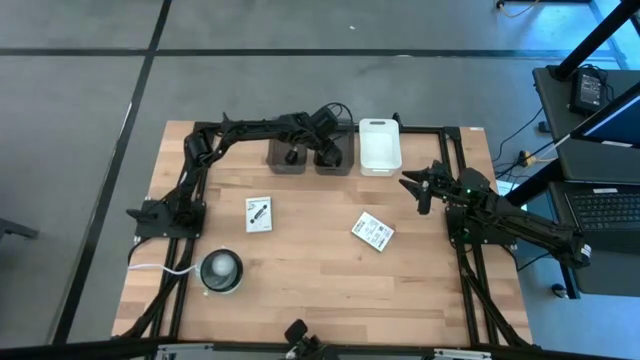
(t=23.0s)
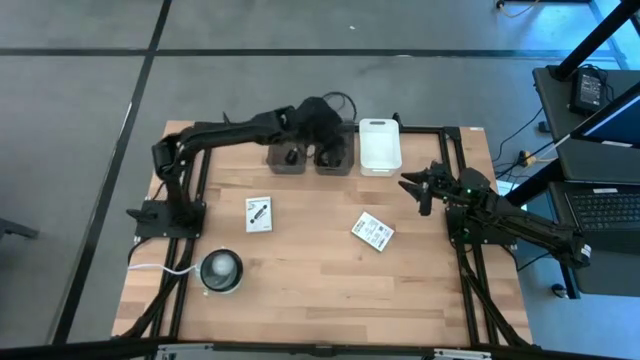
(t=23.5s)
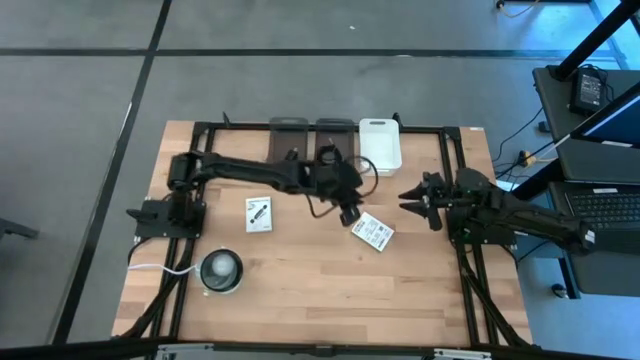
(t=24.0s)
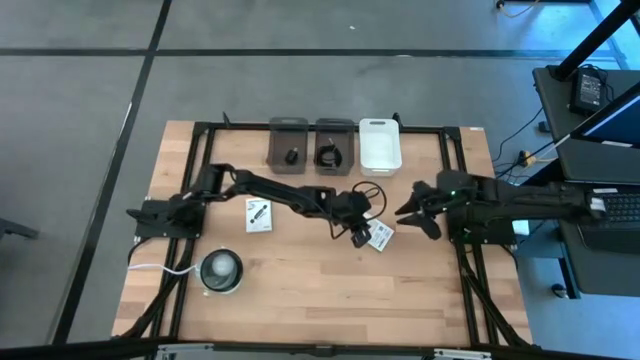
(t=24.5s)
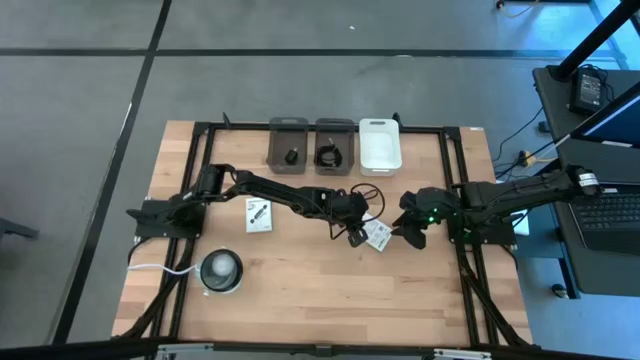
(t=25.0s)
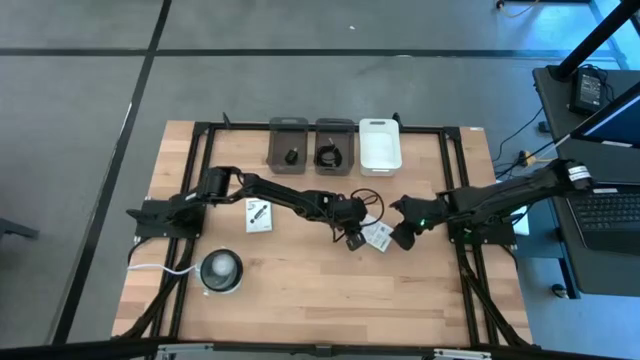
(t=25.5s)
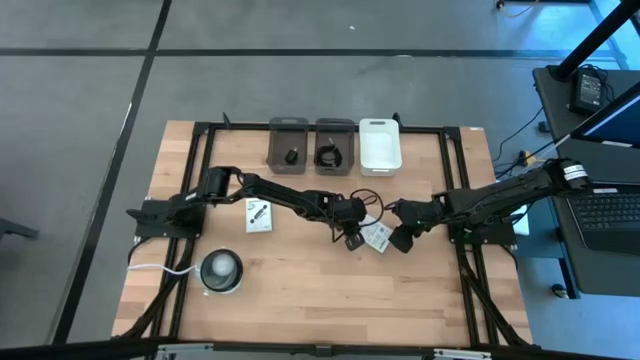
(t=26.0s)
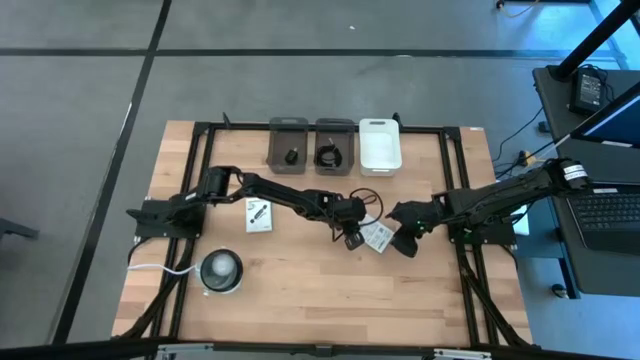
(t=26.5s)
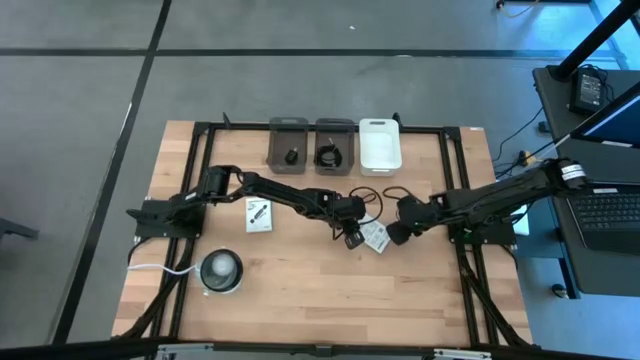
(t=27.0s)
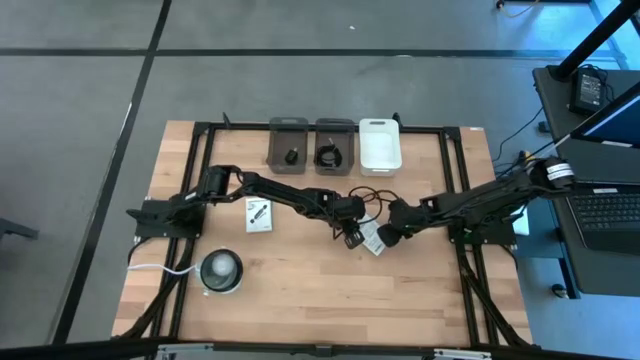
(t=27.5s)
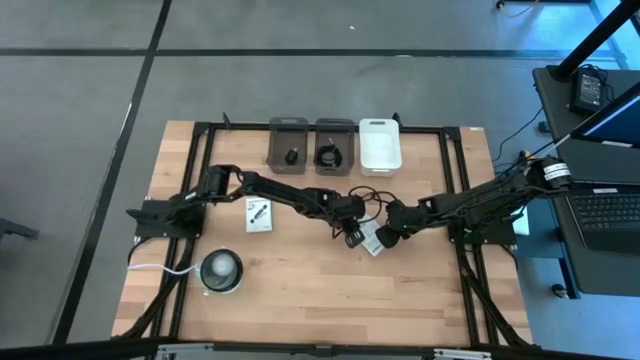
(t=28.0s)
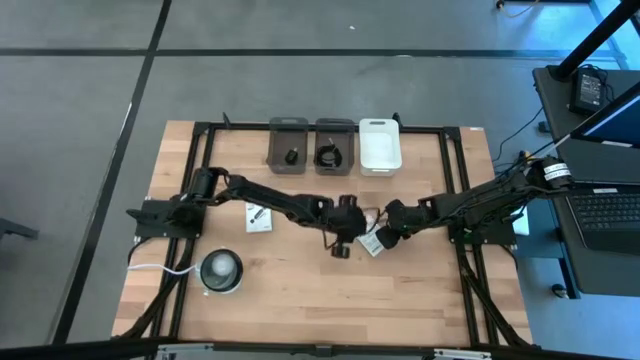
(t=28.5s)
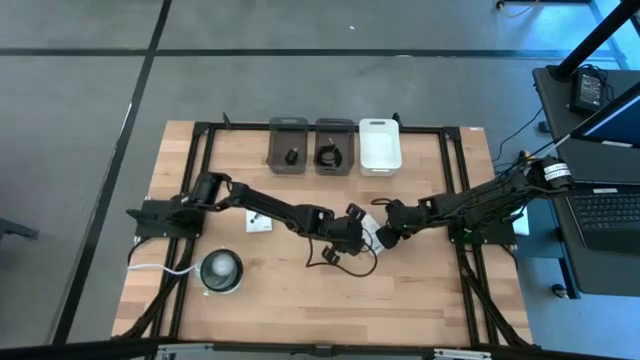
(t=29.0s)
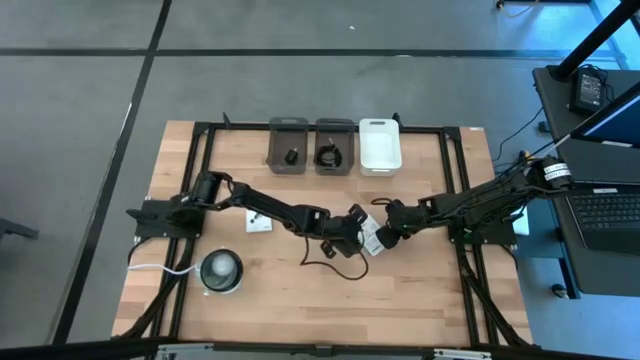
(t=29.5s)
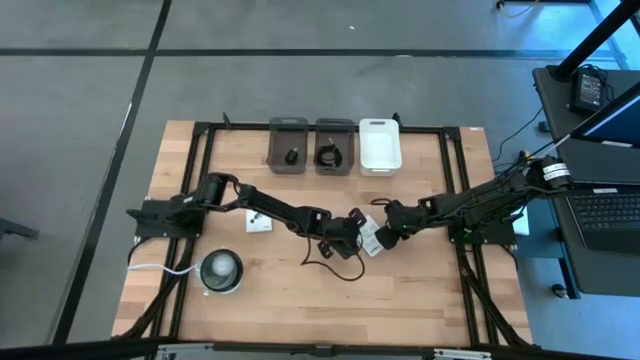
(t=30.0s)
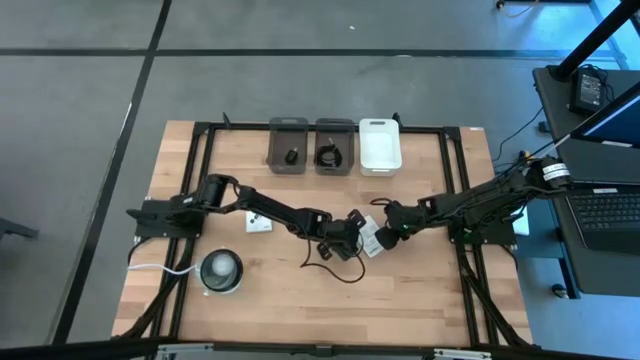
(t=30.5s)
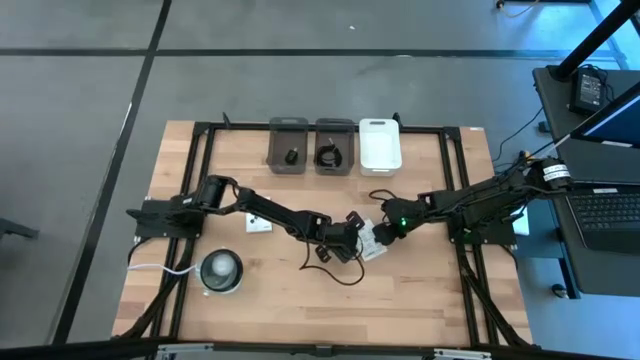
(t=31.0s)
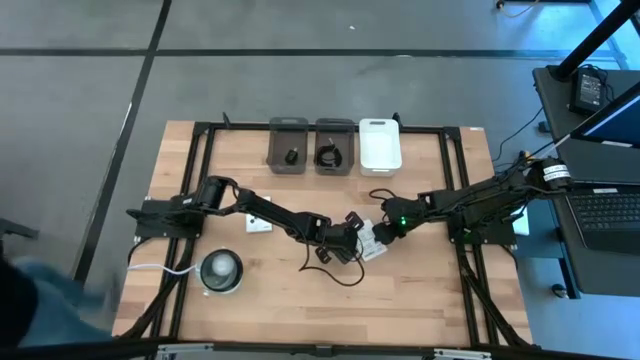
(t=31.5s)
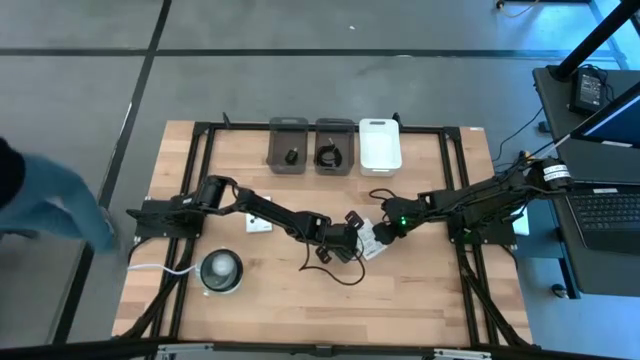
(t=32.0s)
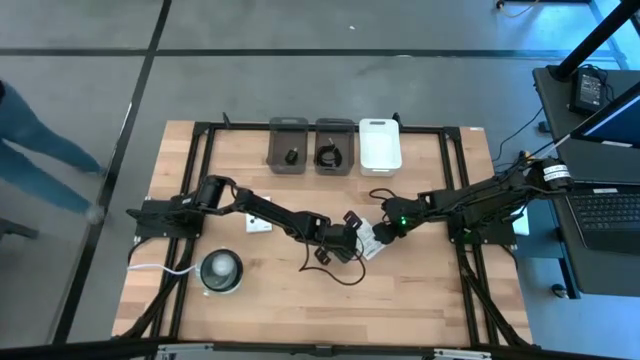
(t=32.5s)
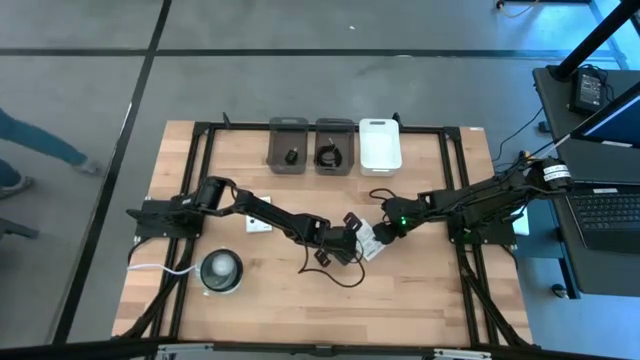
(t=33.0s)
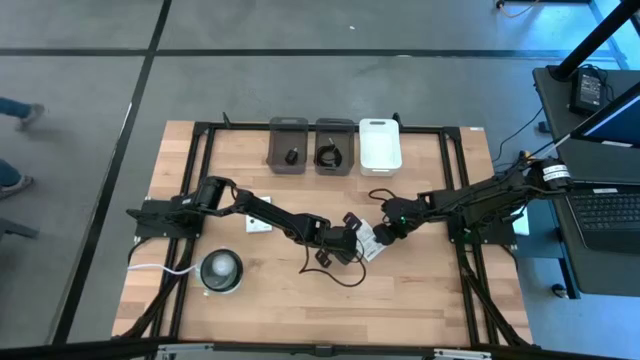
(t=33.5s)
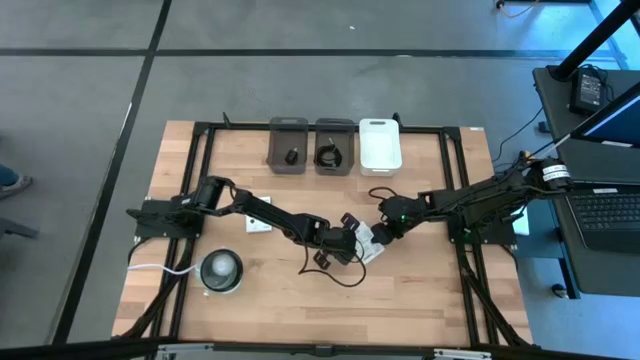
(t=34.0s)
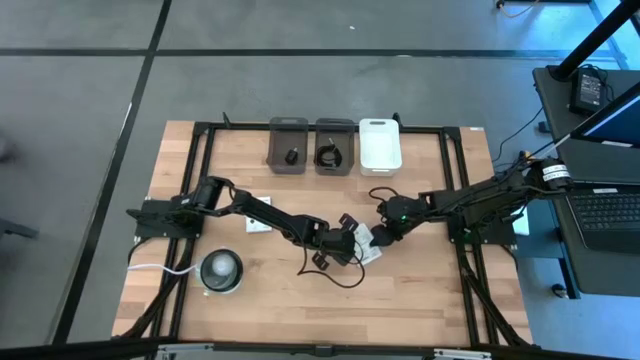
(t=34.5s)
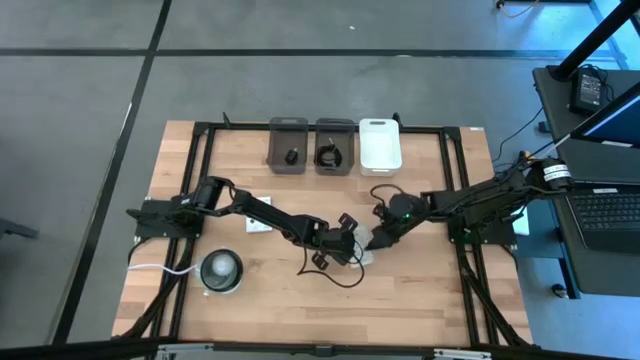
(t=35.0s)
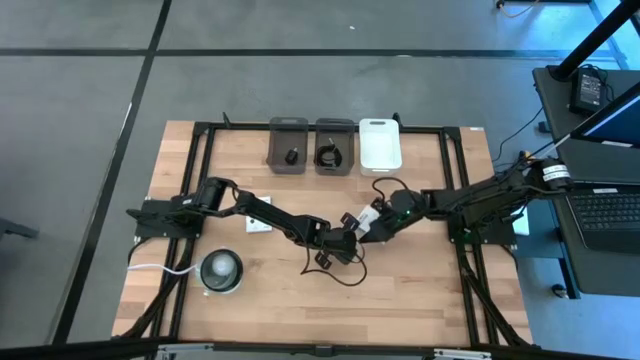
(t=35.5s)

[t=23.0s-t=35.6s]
Task: Pick and place items into bin
Put the white card reader box into the white bin

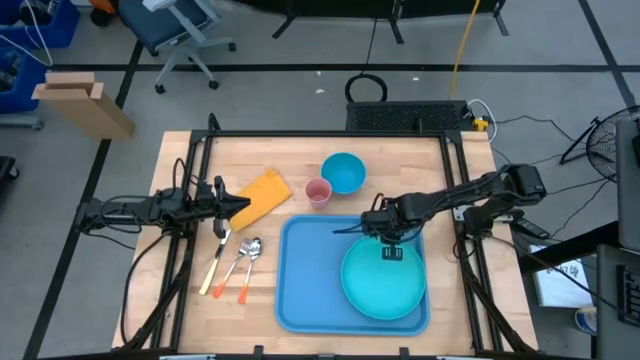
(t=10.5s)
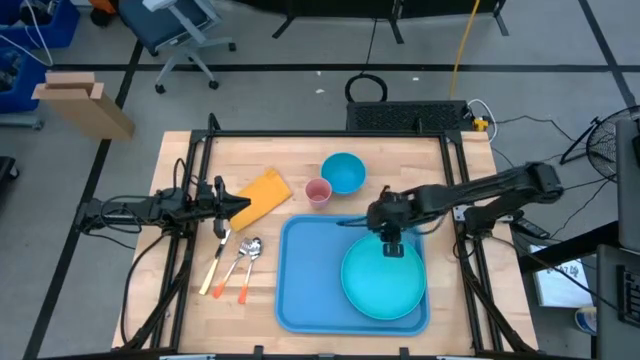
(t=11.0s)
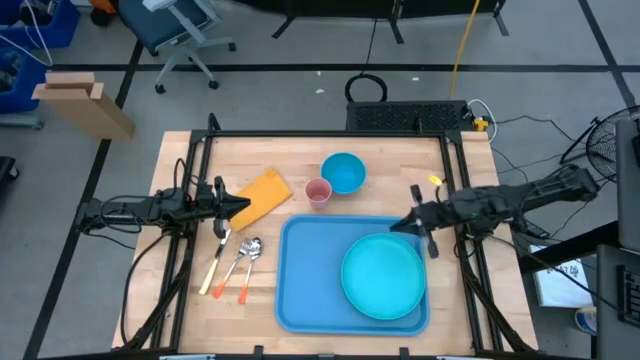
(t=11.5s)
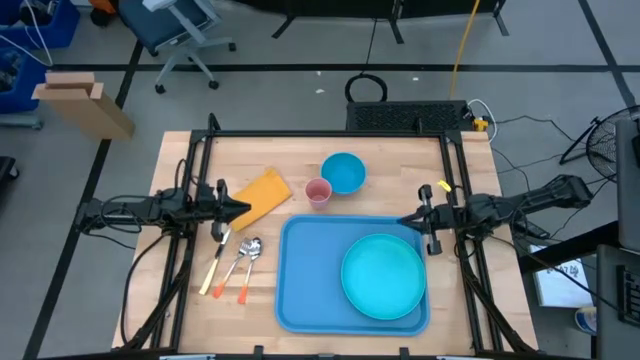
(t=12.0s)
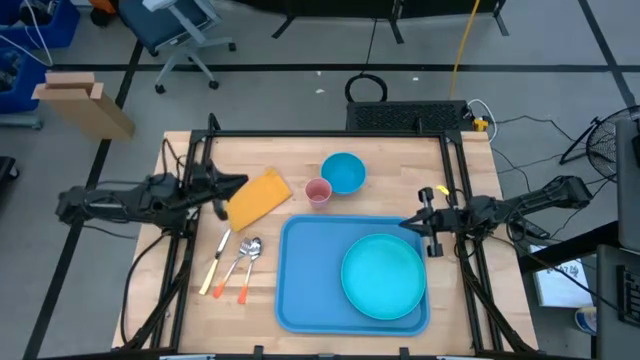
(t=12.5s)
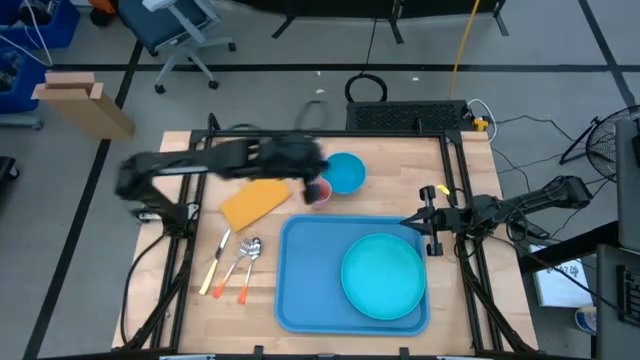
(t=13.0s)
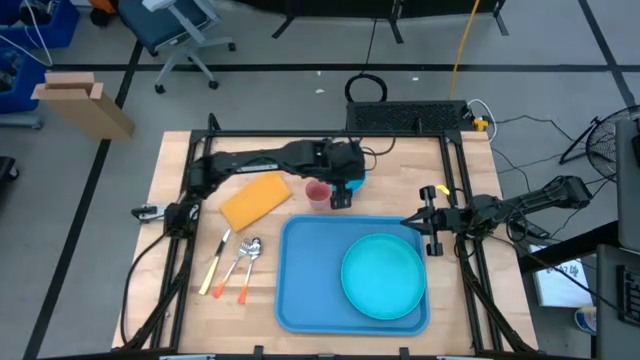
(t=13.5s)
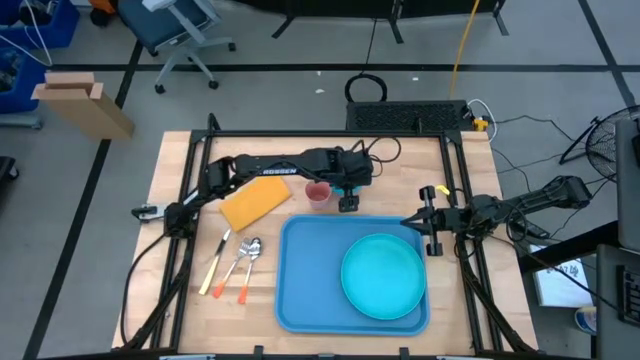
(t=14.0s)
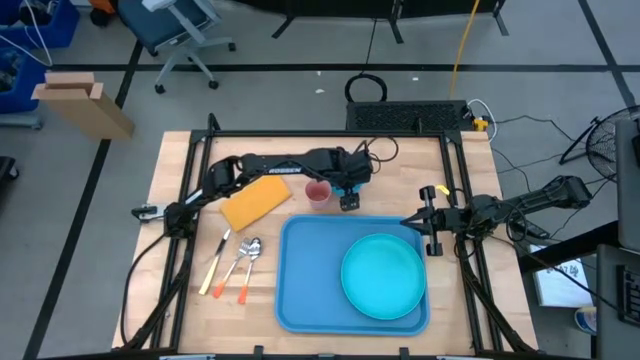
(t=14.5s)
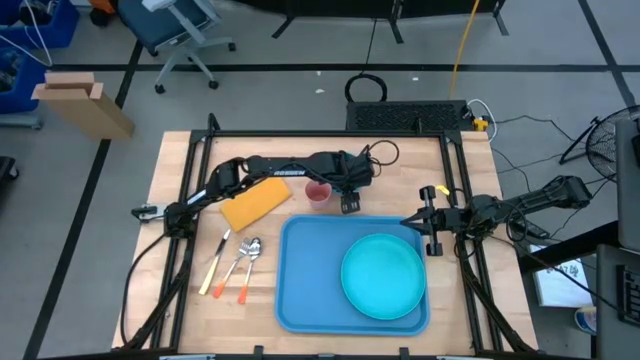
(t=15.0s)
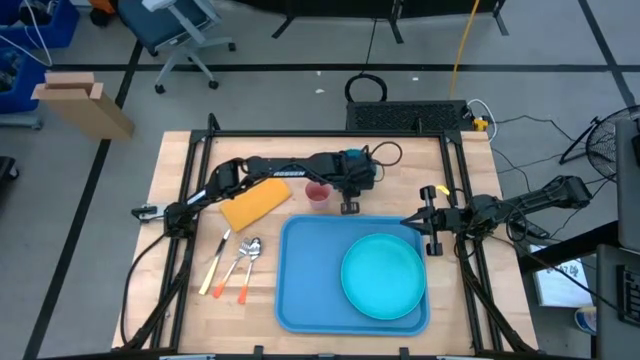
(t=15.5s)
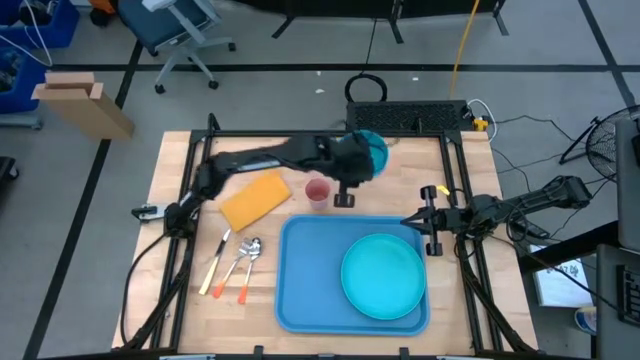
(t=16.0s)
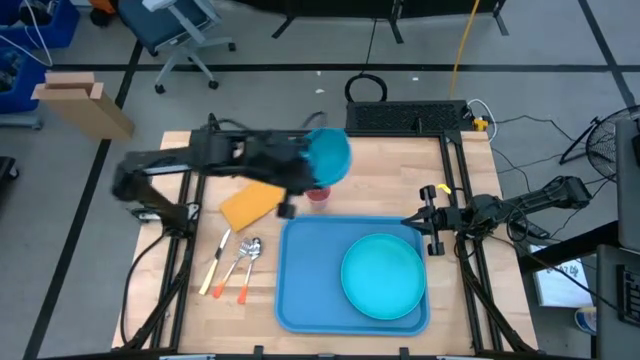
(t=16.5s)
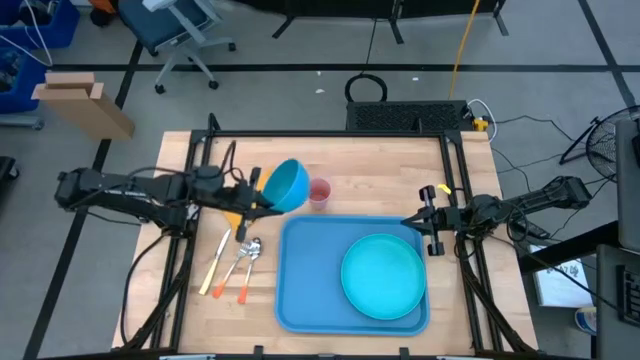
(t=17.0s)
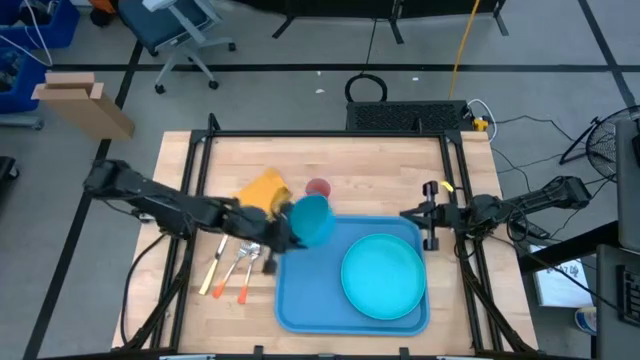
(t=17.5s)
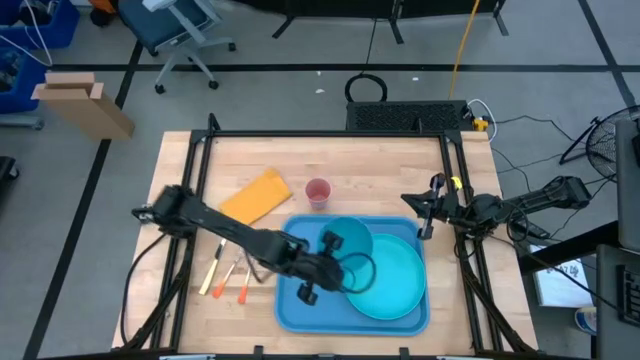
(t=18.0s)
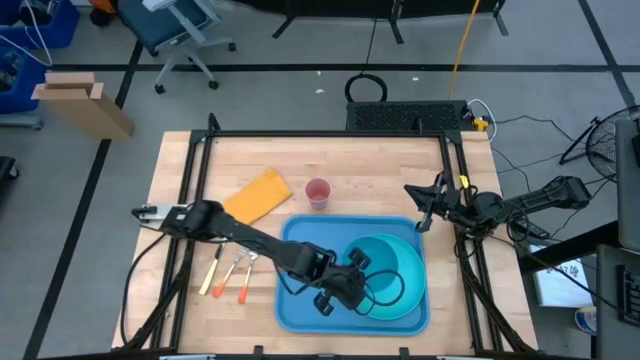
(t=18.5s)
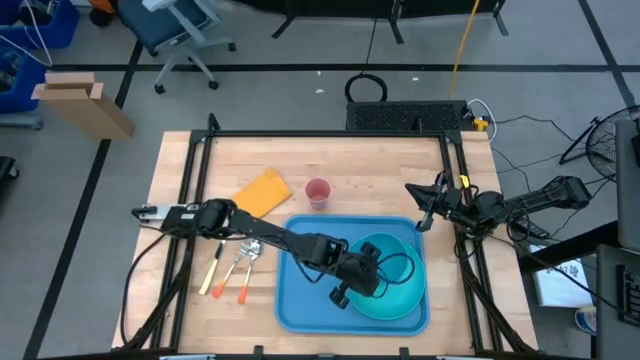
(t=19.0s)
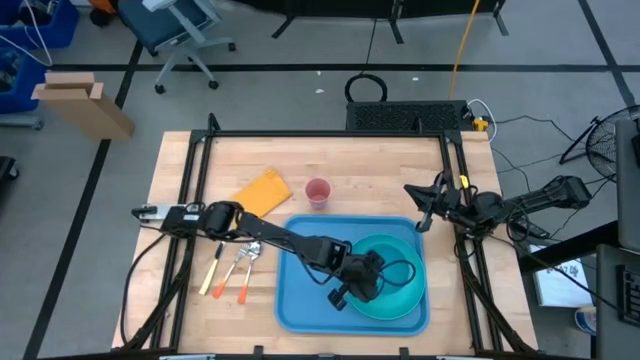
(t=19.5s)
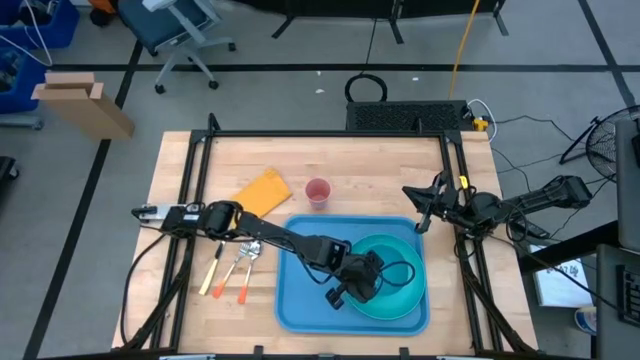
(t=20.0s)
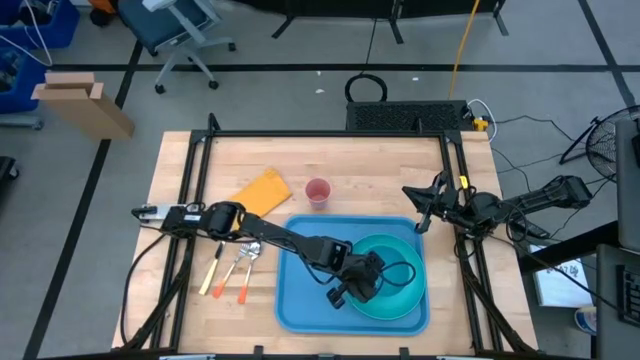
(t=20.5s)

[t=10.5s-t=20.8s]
Task: Set up tray
Put the blue bowl on the plate
